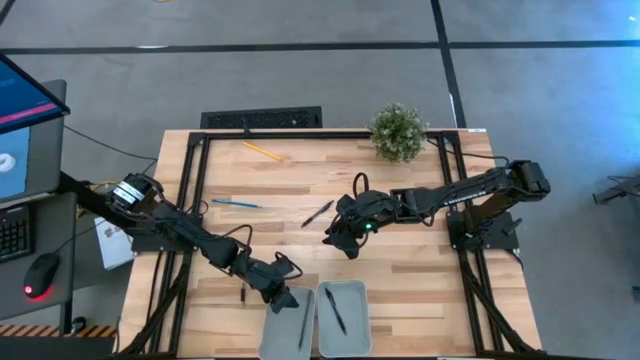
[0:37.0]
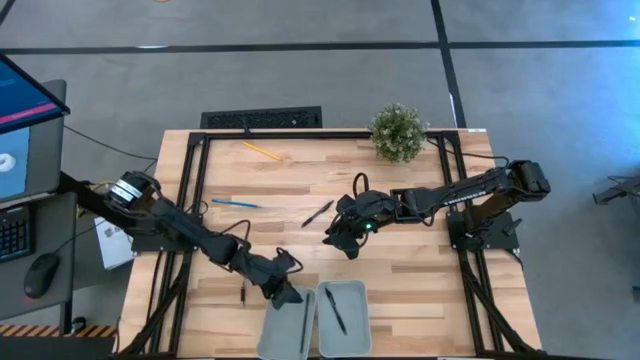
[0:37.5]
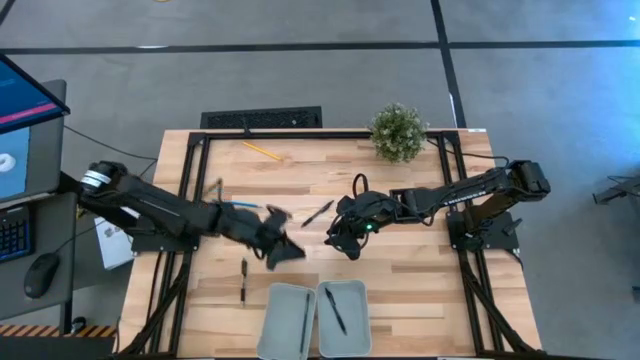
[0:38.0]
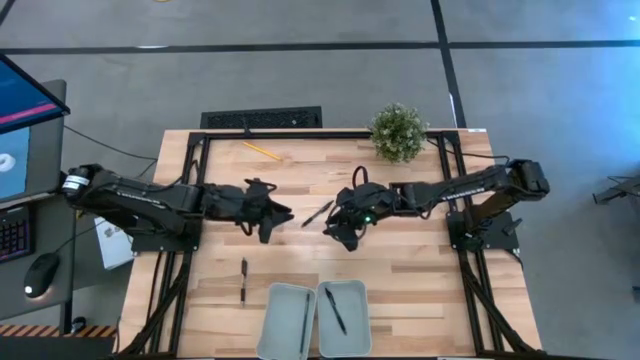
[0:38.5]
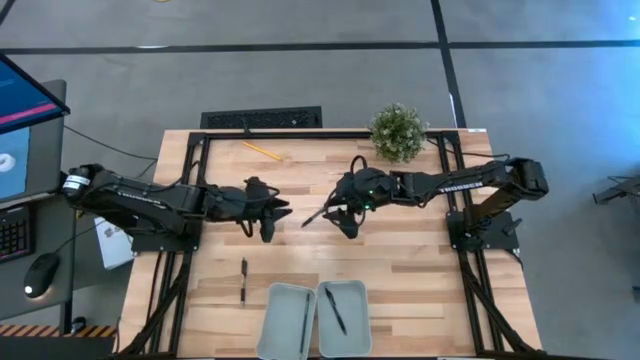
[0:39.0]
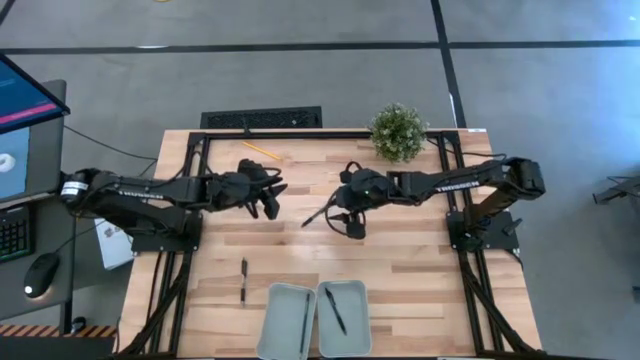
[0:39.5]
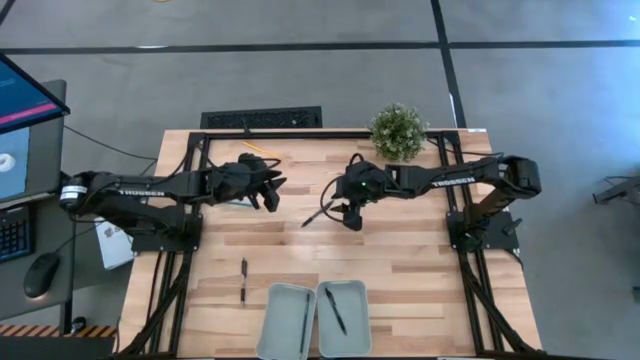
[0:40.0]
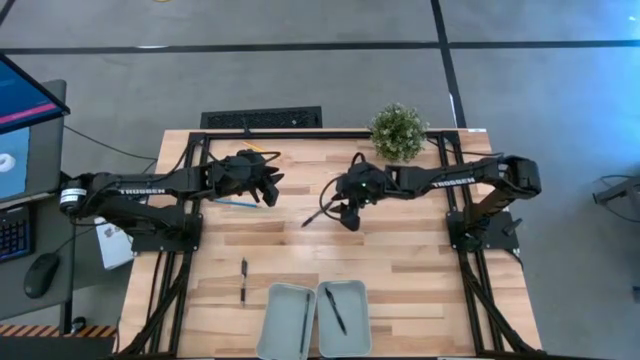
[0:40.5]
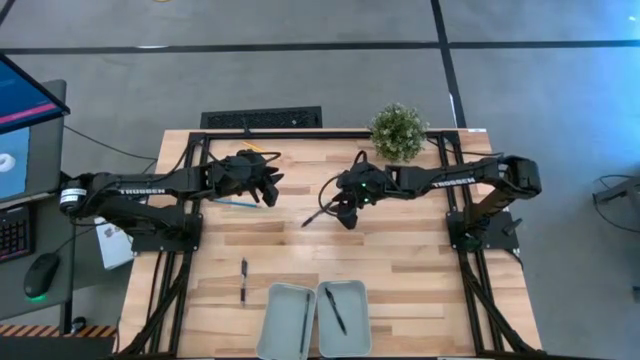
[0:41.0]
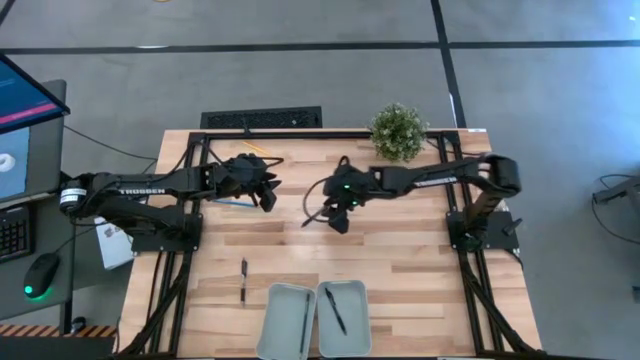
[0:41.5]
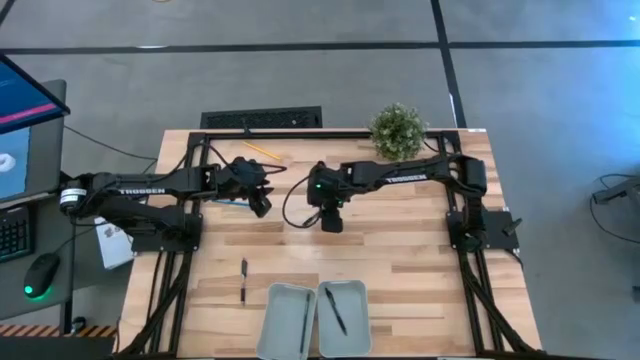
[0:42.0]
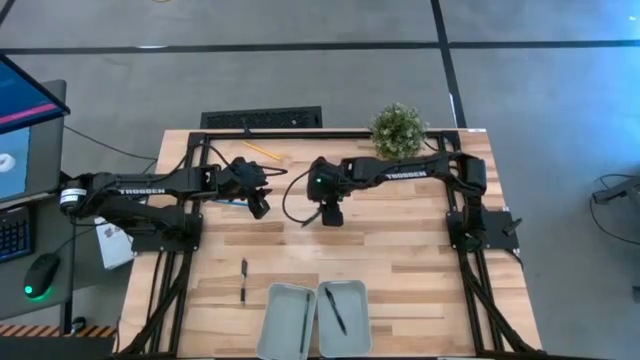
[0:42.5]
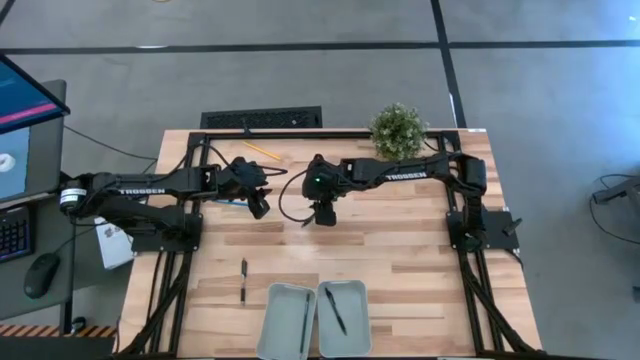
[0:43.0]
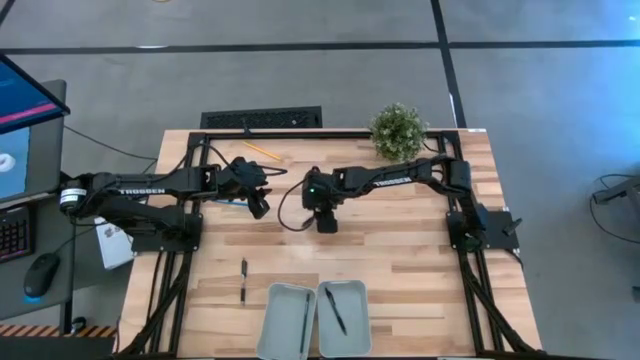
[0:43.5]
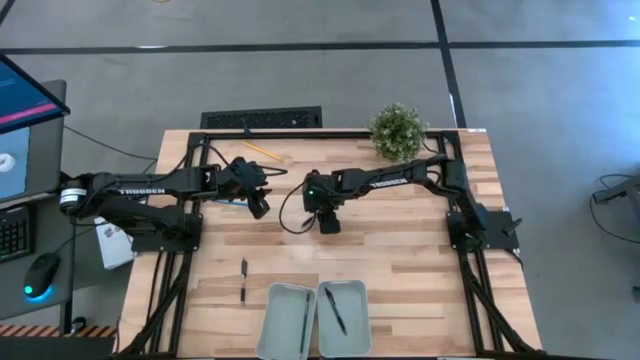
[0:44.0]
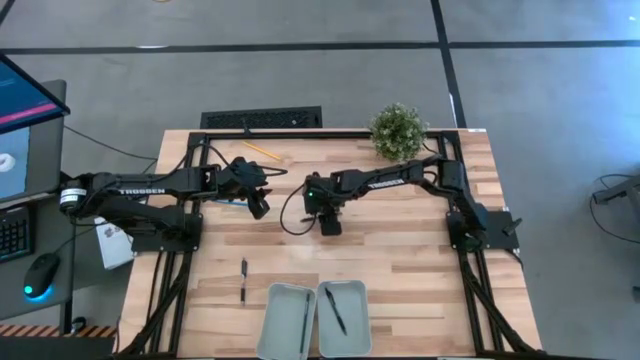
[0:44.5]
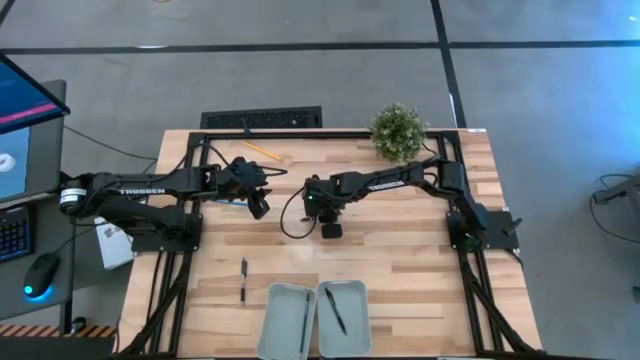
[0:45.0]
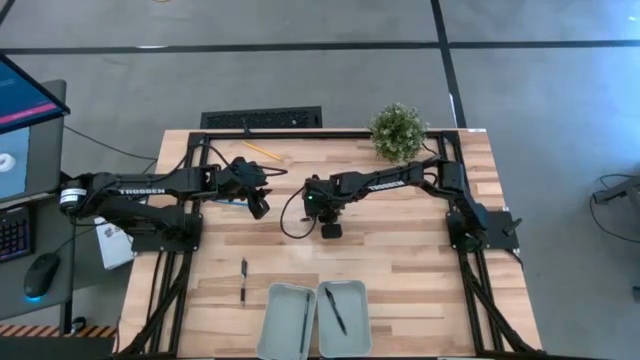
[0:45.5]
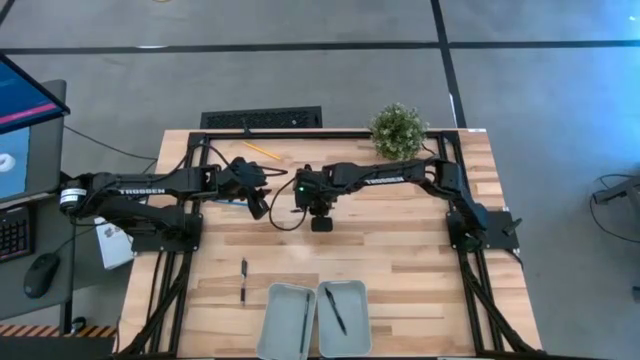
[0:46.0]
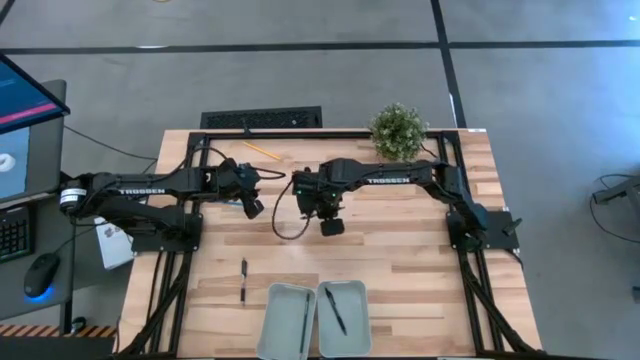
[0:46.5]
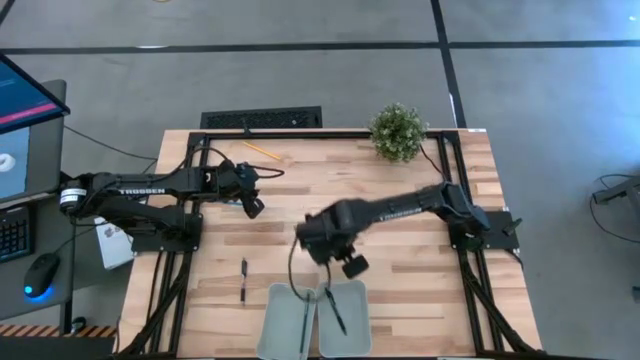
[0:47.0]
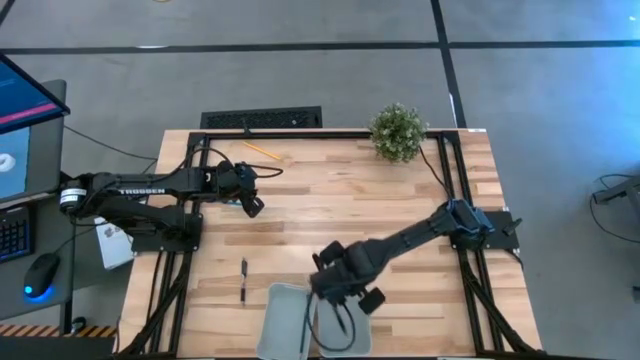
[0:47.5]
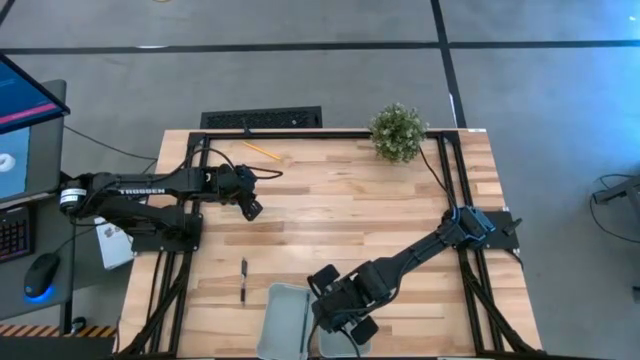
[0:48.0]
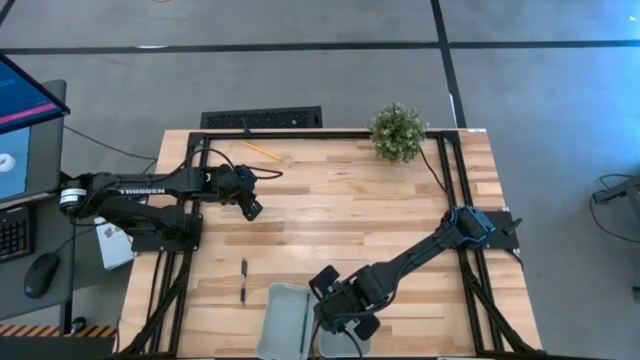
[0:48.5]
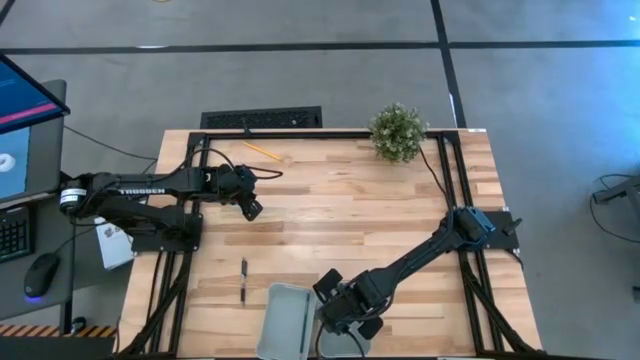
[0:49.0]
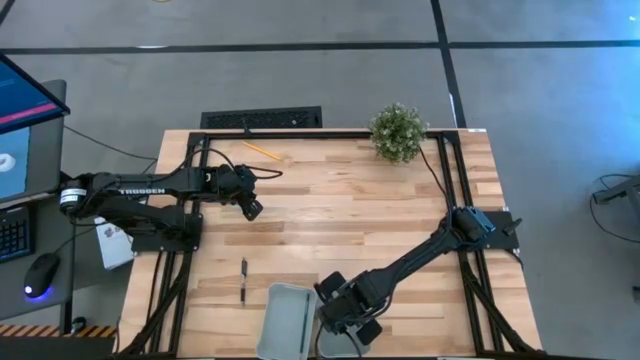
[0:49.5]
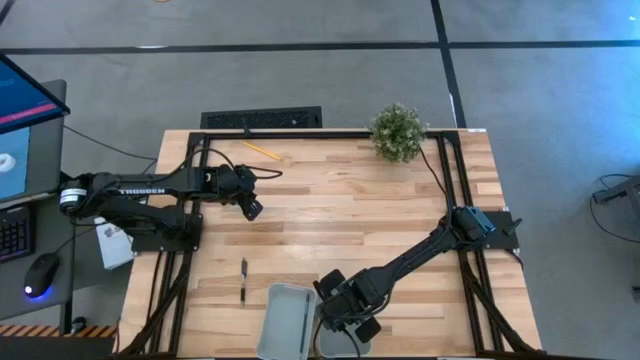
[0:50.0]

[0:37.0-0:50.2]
Task: Sort pens & pencils
Put the top black pen into the right gray bin

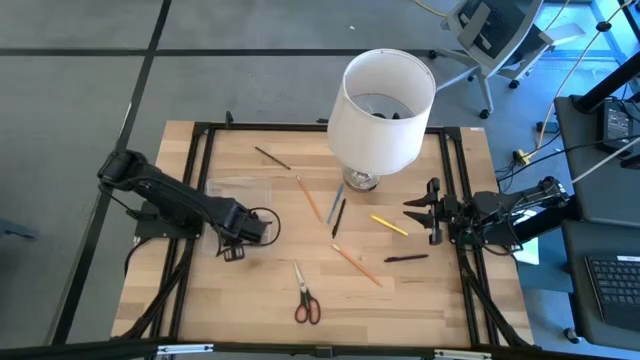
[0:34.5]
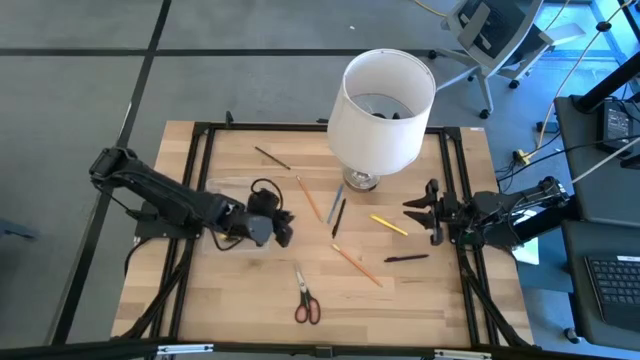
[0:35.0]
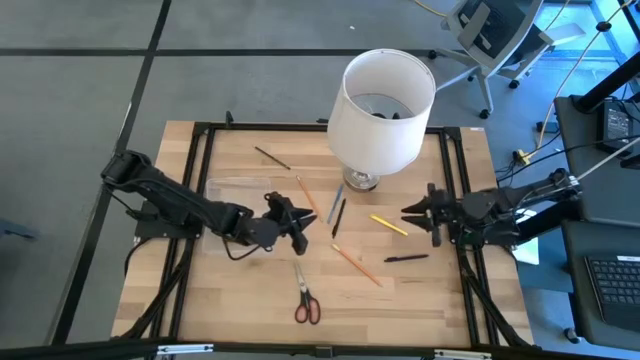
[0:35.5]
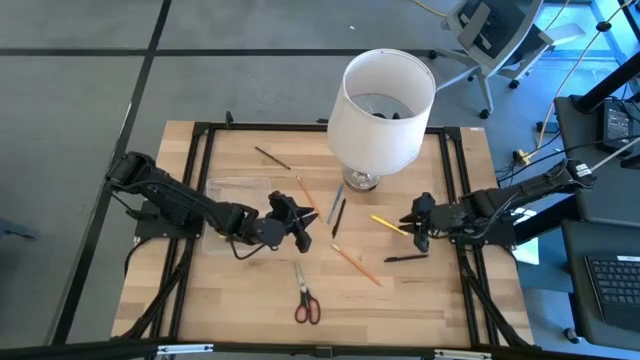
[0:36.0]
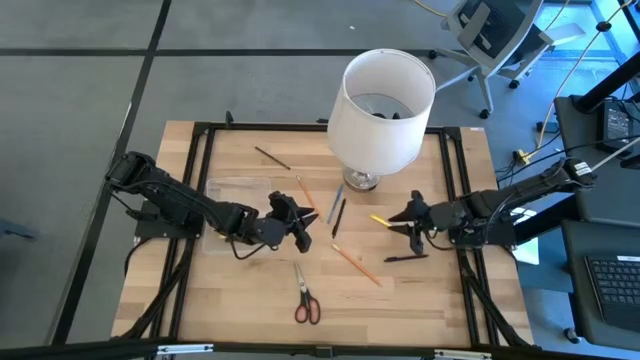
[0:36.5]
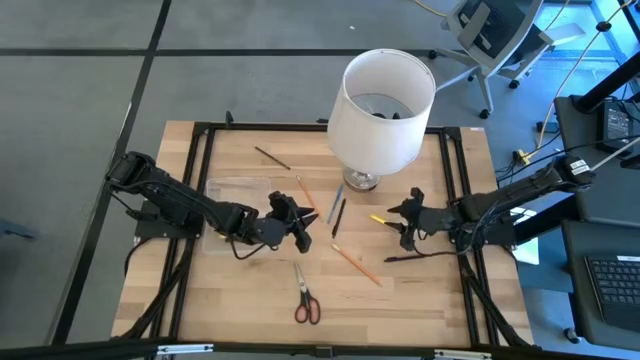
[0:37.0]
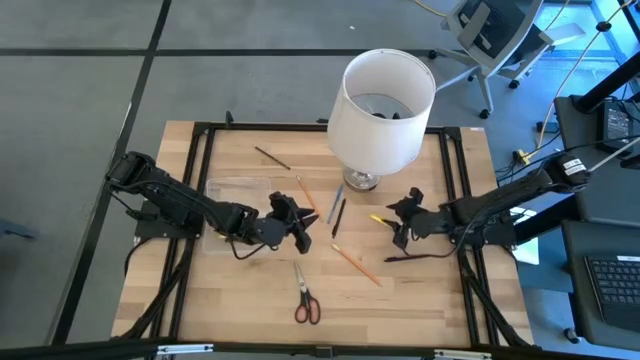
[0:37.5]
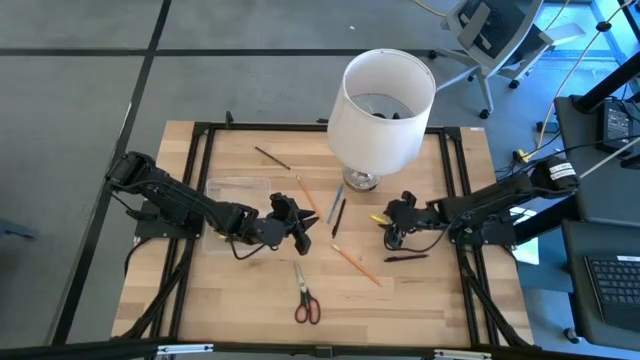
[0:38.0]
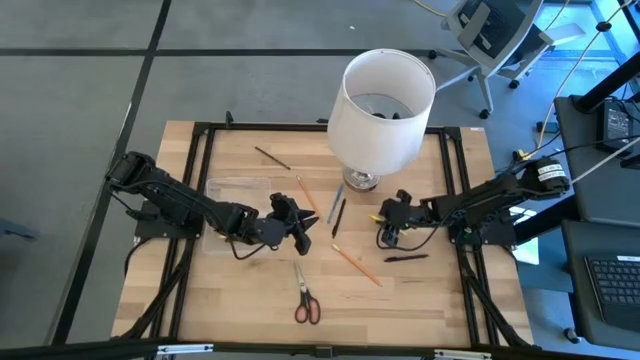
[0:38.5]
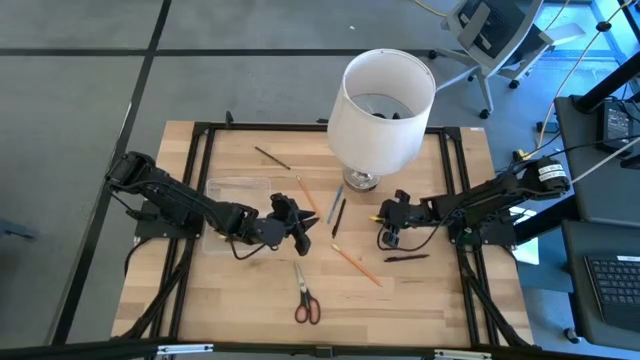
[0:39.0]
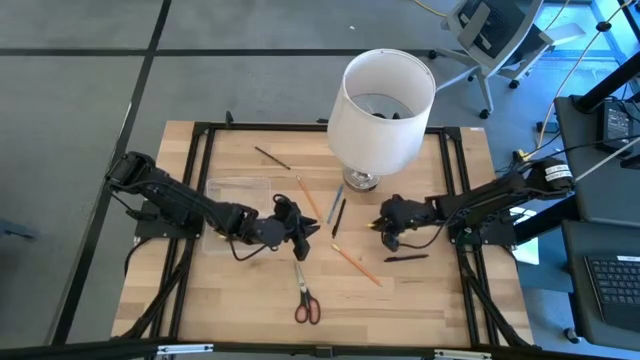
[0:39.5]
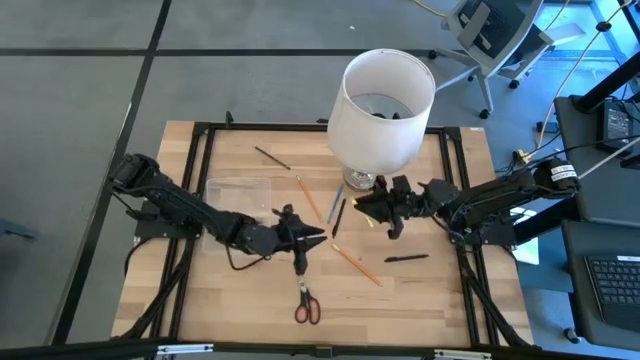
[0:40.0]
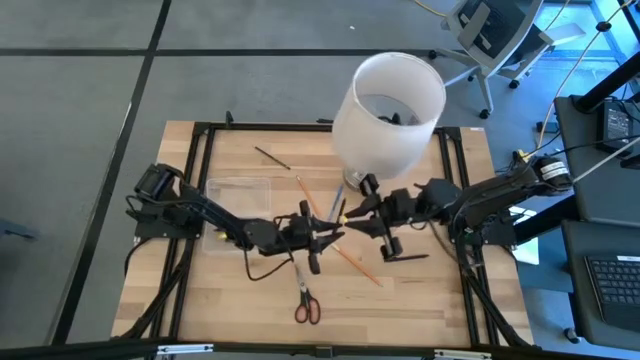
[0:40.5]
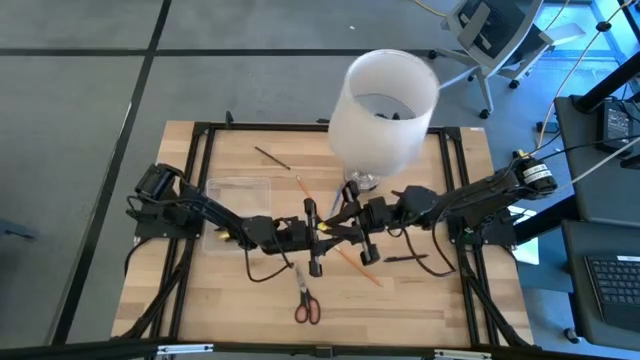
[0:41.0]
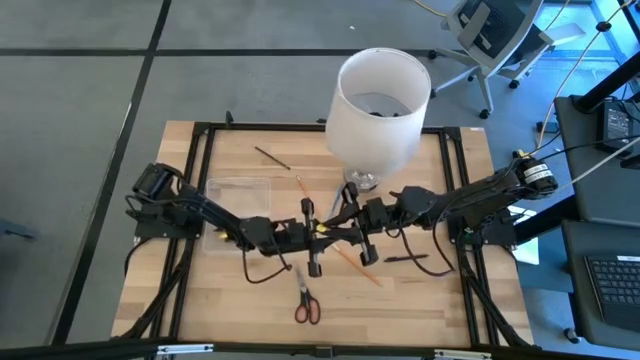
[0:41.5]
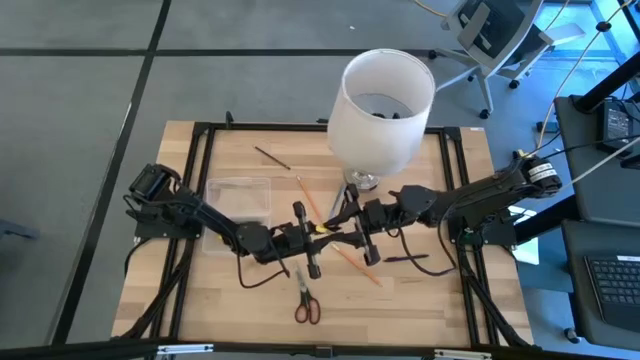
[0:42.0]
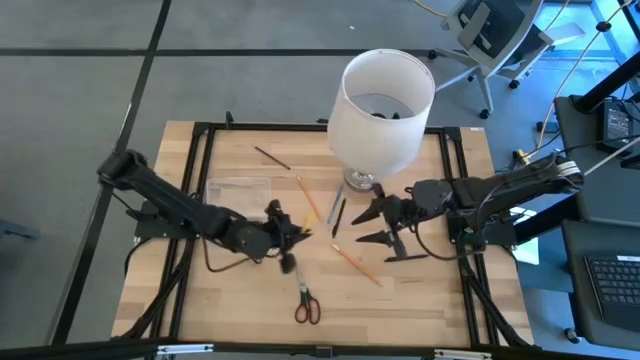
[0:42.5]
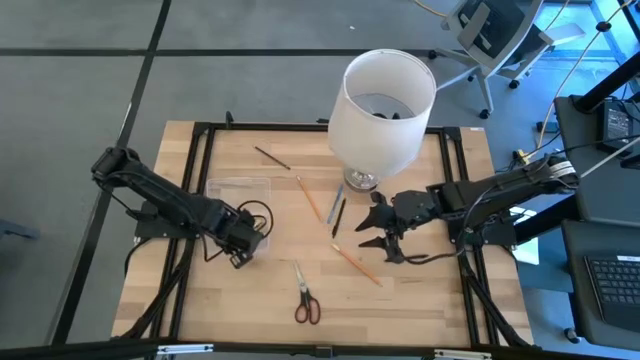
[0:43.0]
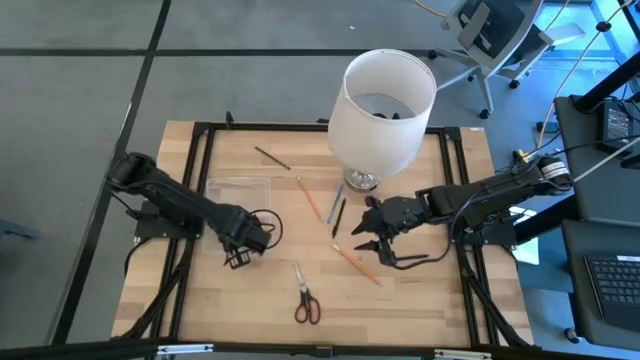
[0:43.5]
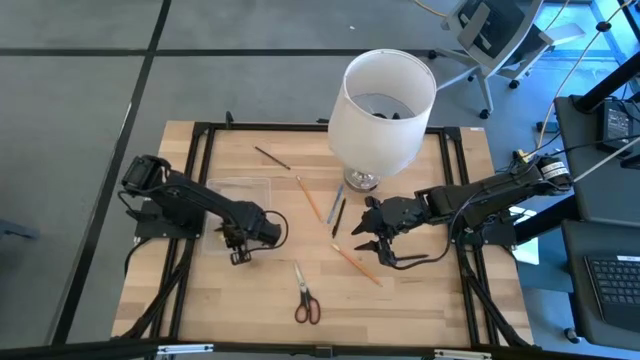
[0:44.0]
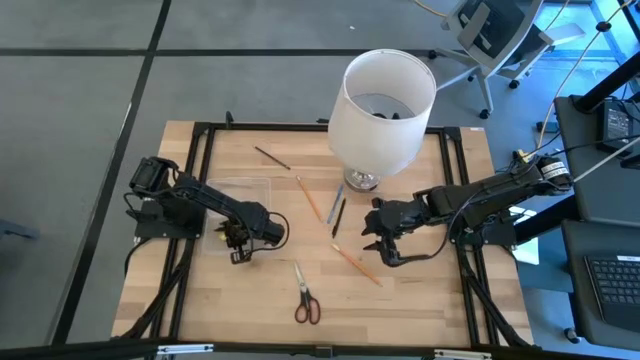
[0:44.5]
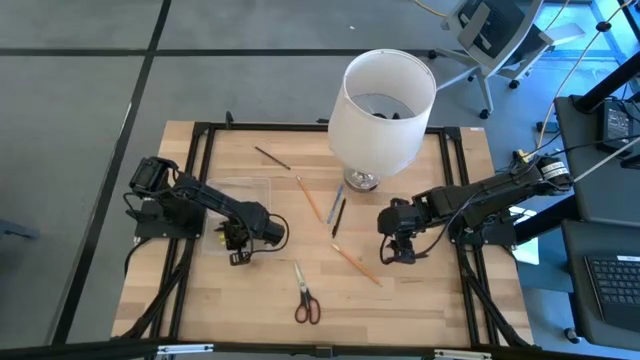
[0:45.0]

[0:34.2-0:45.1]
Task: Pick & place school supplies into a supply box
Put the yellow pen into the transparent supply box
